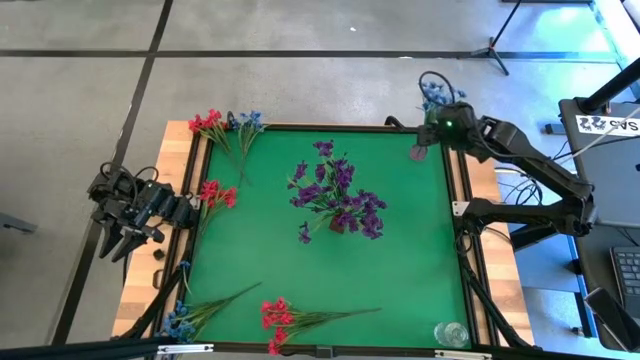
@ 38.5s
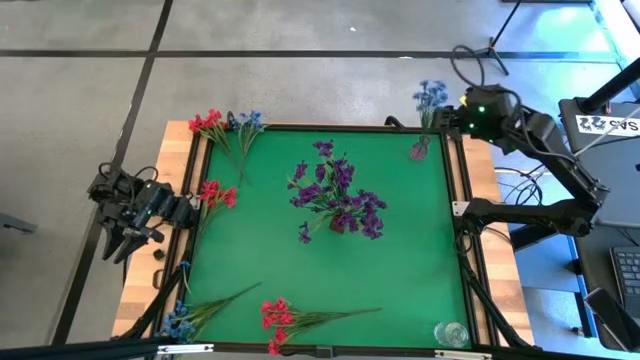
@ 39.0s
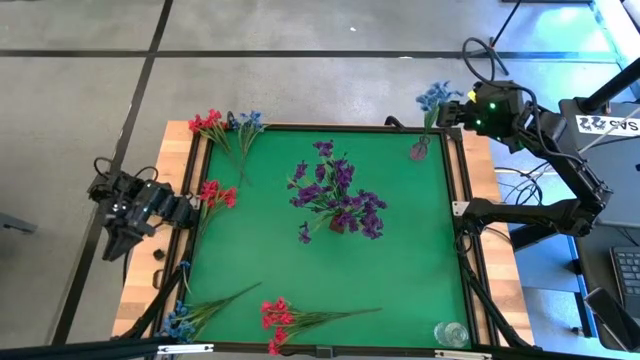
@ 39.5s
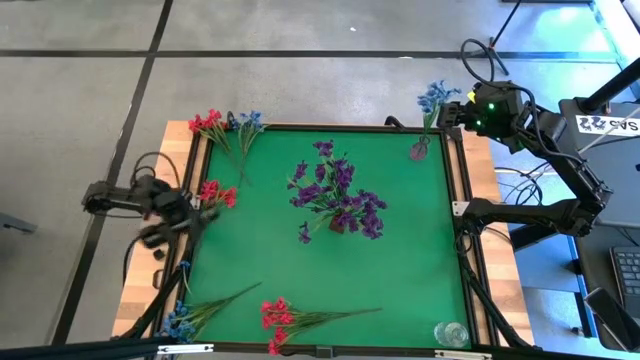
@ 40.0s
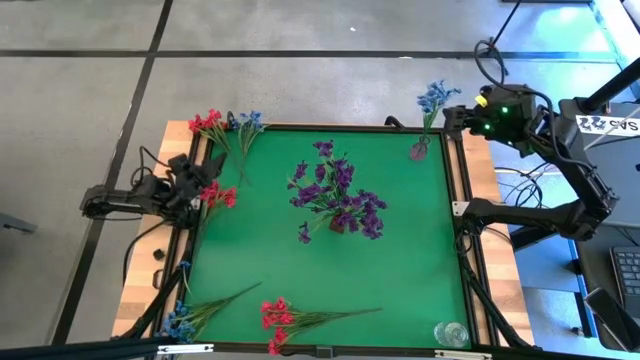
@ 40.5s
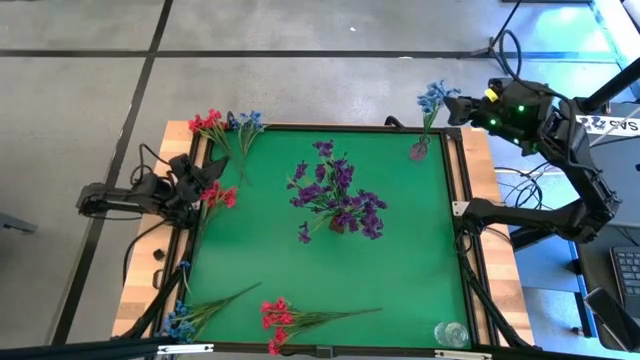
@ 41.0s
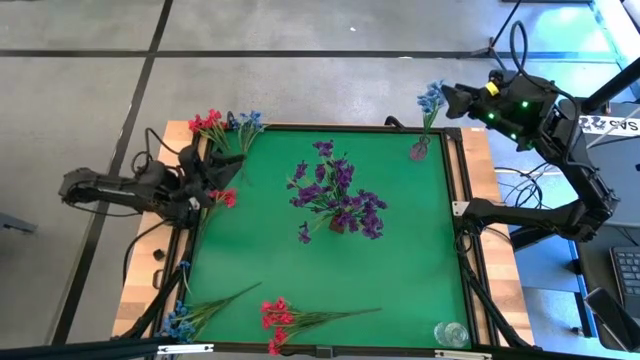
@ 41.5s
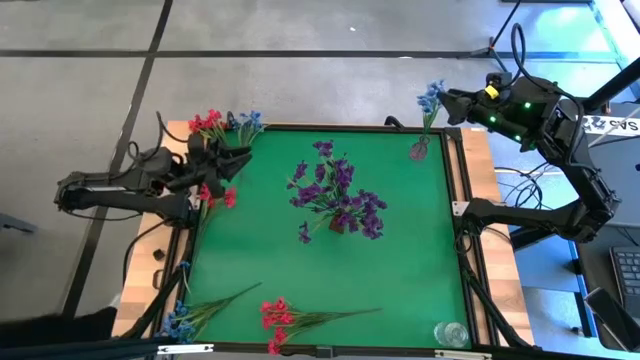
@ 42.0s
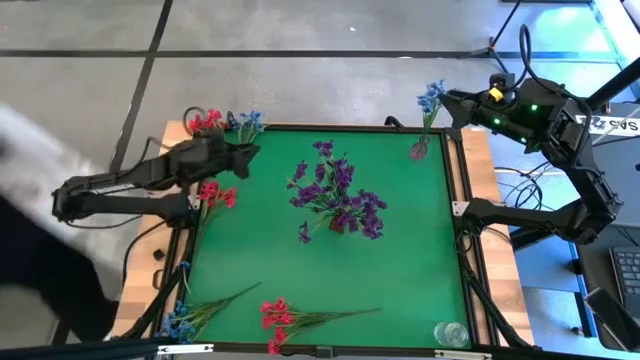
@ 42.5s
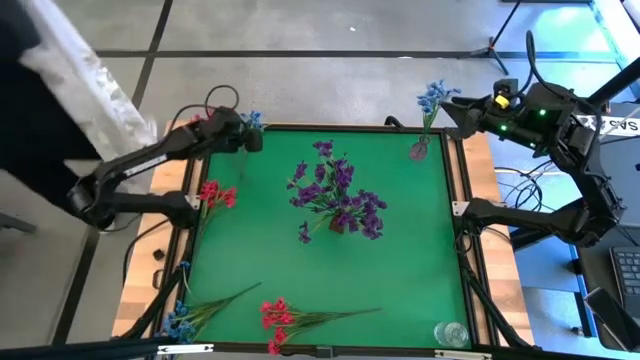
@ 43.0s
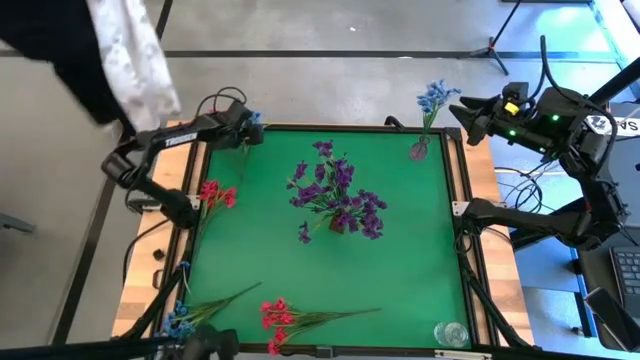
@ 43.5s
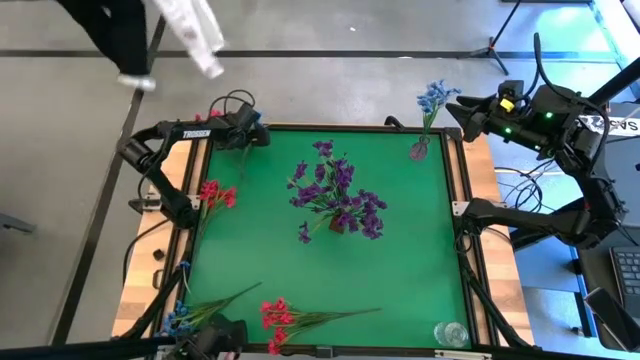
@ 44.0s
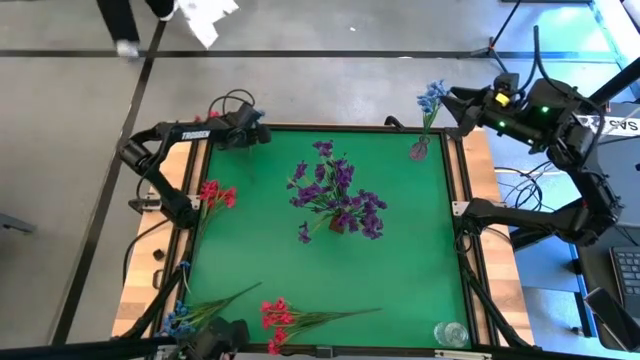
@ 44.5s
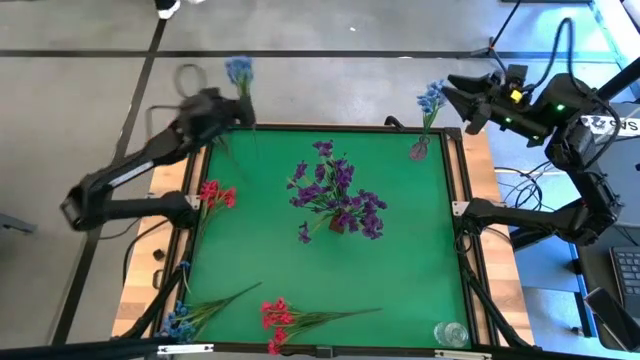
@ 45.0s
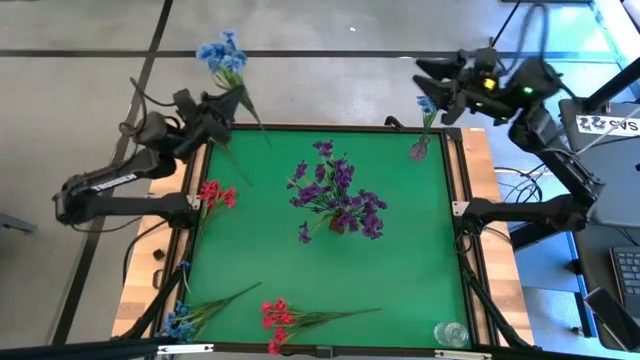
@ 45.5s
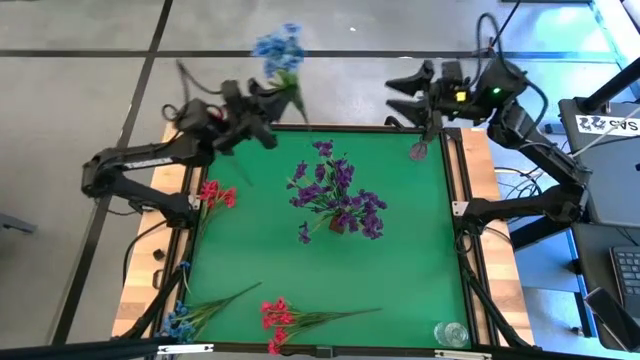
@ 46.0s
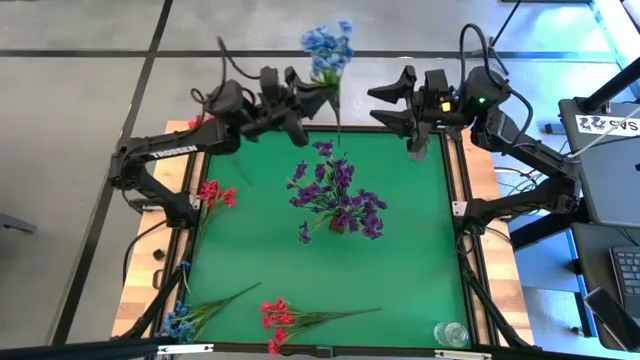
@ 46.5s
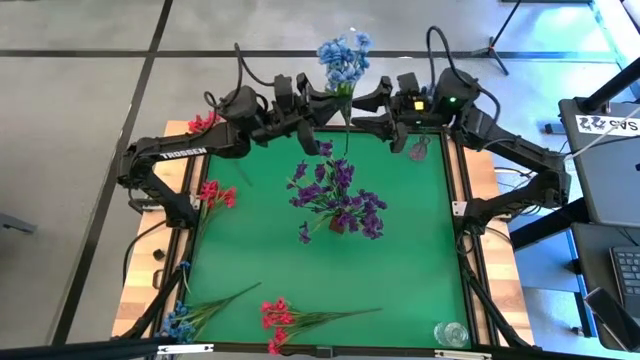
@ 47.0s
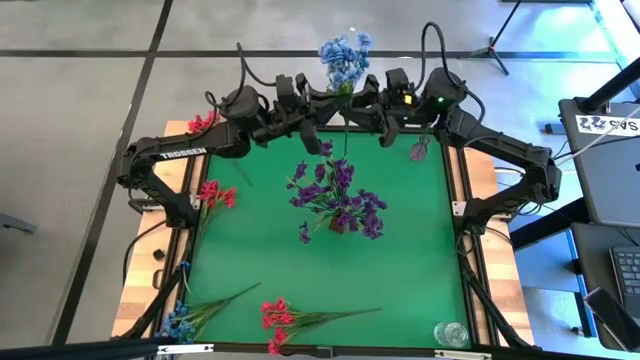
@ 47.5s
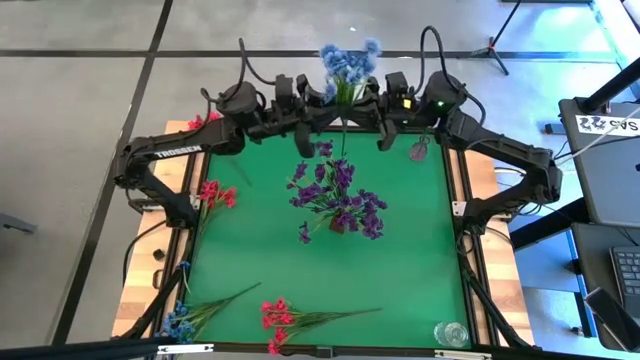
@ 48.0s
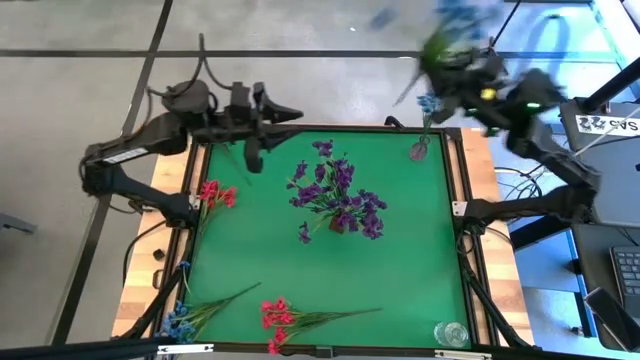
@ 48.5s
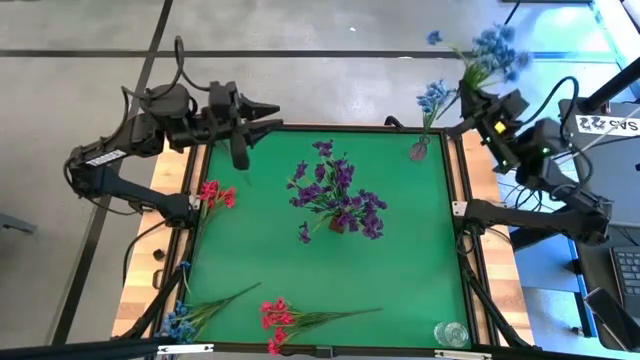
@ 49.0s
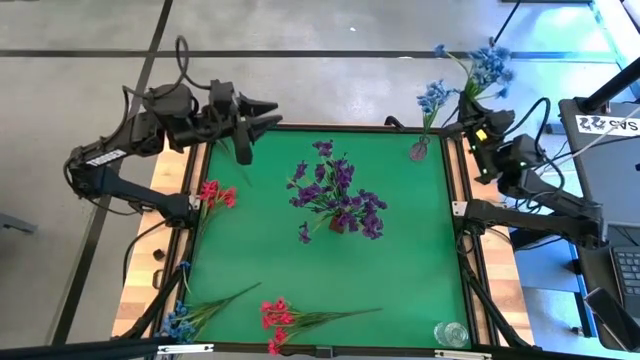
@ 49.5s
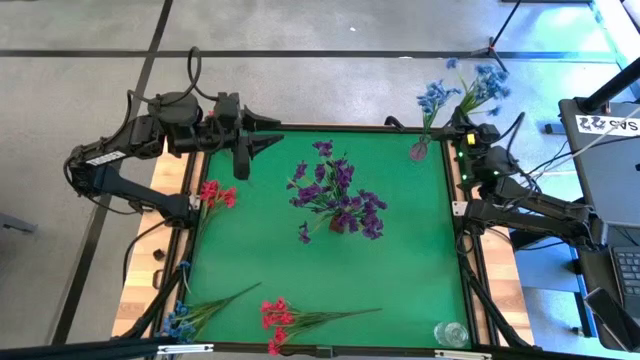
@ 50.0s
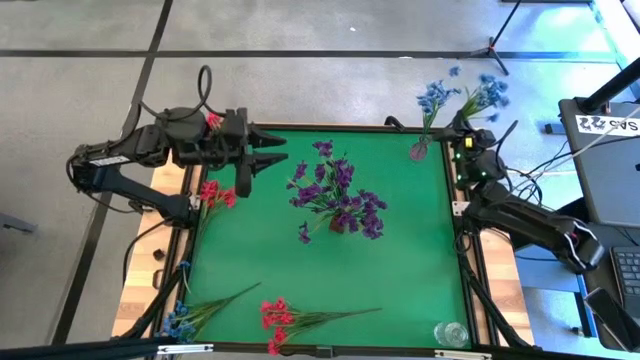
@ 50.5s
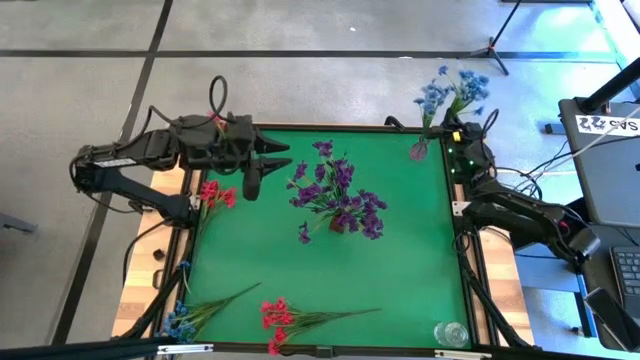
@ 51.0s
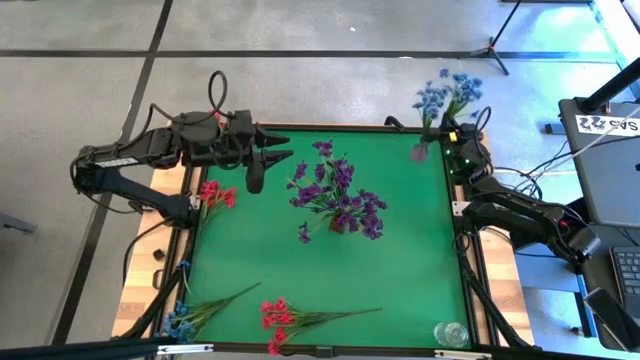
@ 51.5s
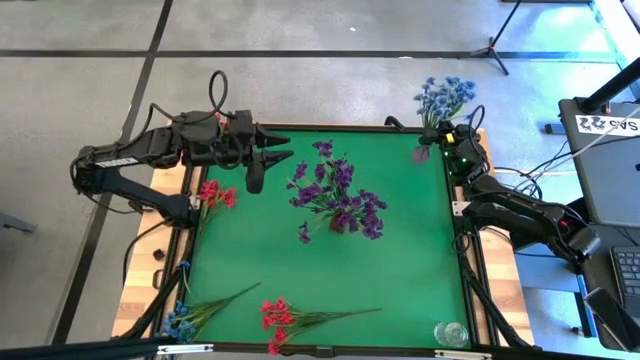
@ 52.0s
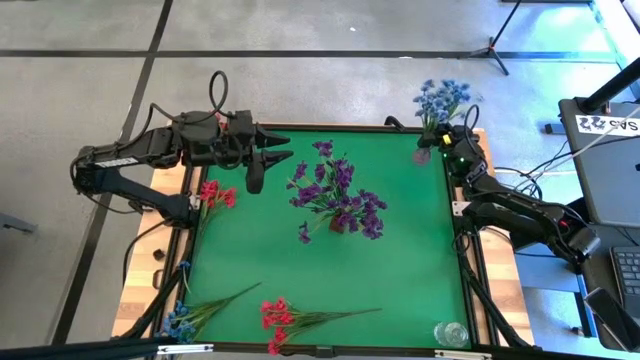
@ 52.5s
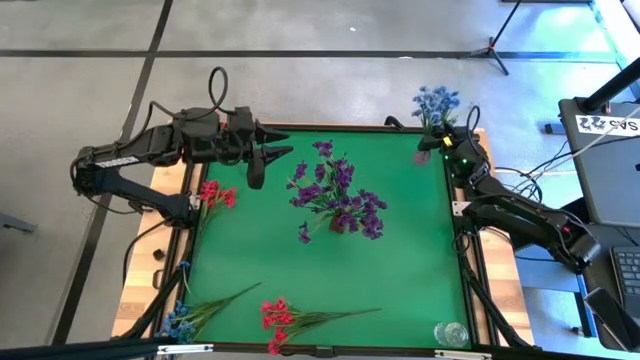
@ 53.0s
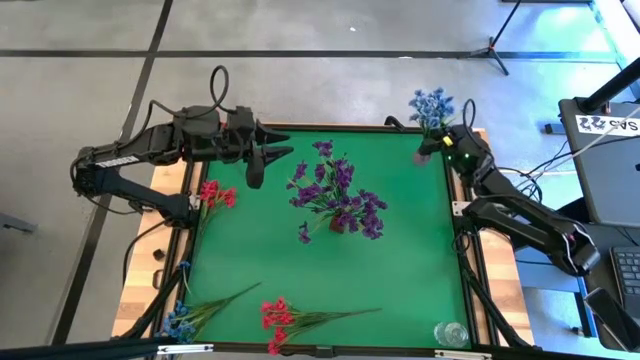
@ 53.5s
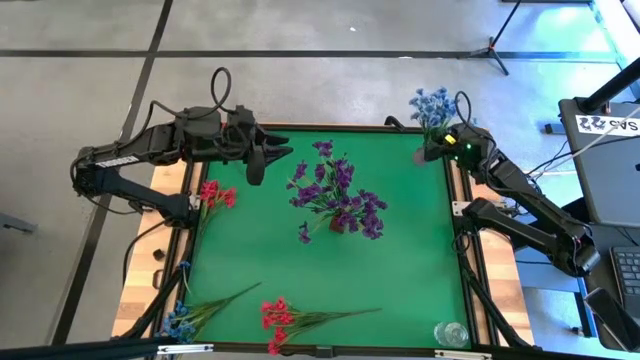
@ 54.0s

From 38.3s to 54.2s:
Task: Sort flowers into vase by color
Put the top blue flowers into the violet vase

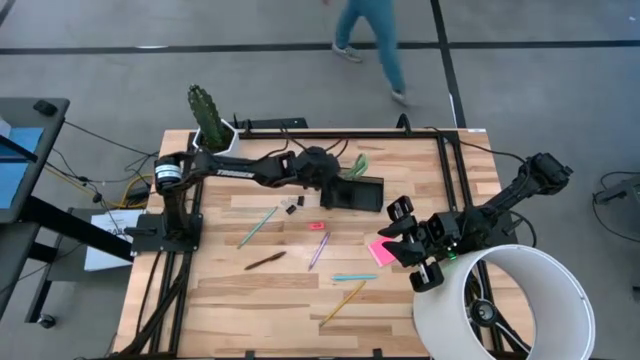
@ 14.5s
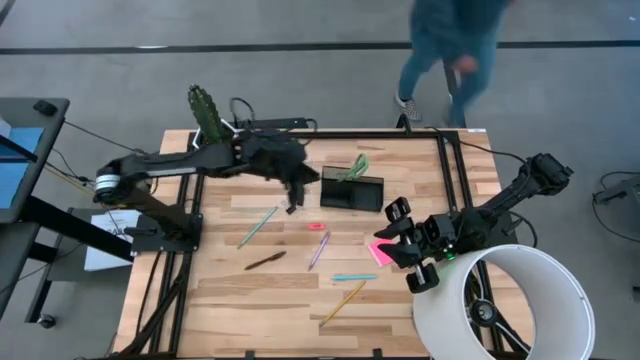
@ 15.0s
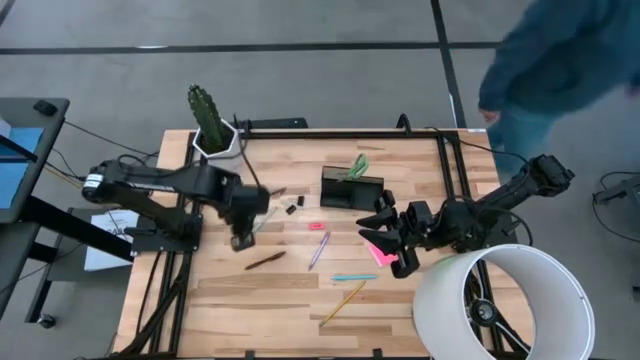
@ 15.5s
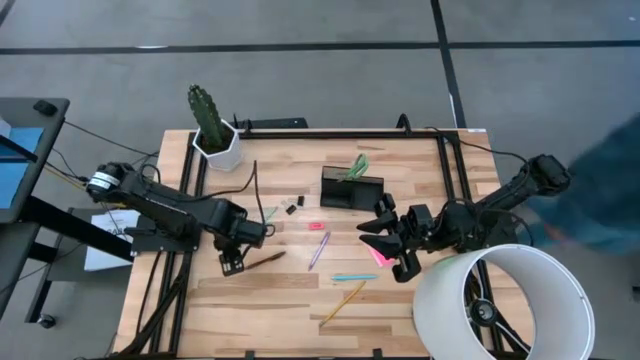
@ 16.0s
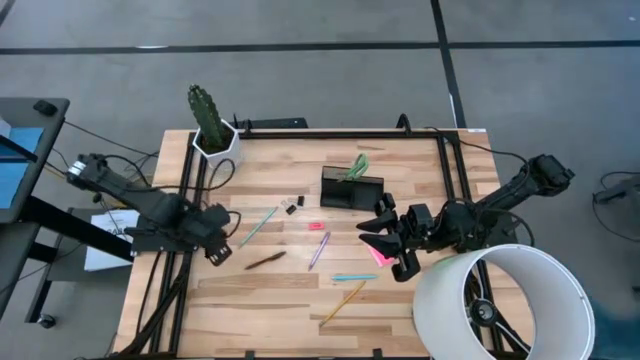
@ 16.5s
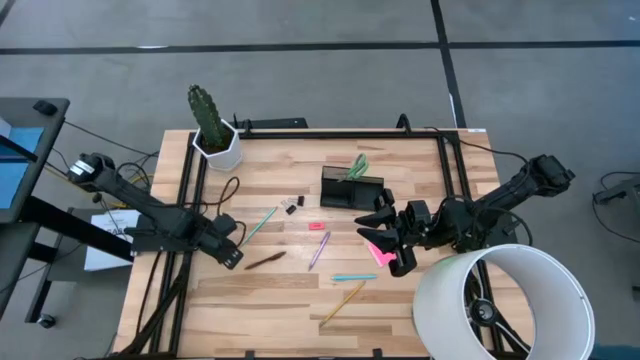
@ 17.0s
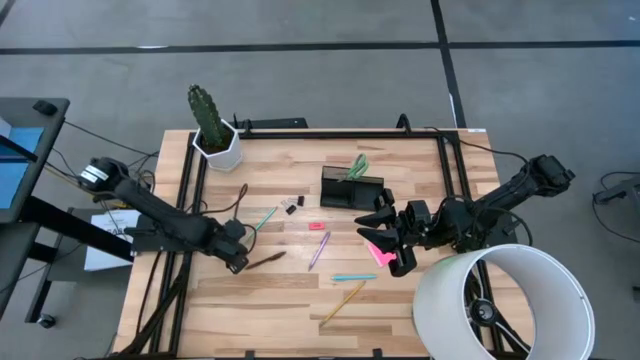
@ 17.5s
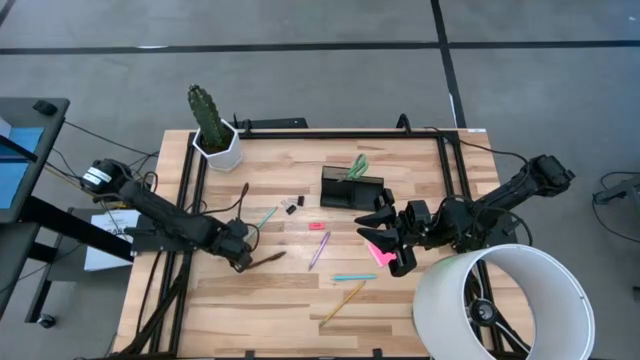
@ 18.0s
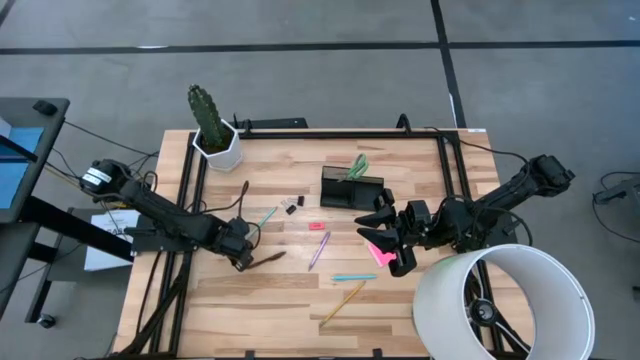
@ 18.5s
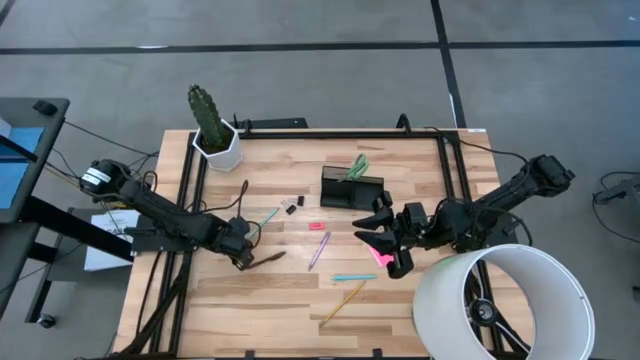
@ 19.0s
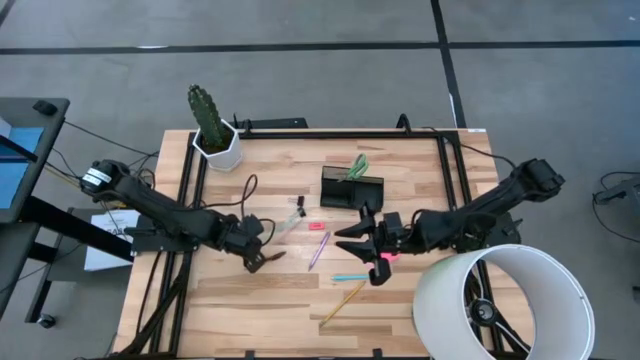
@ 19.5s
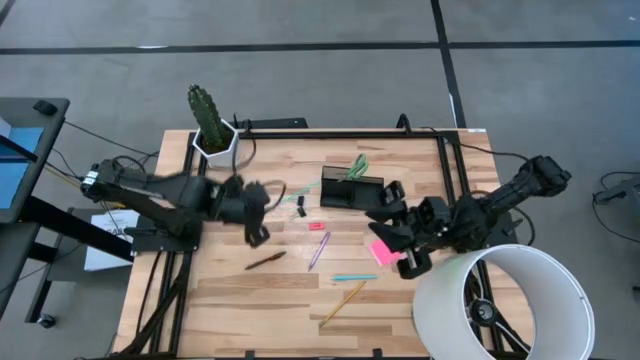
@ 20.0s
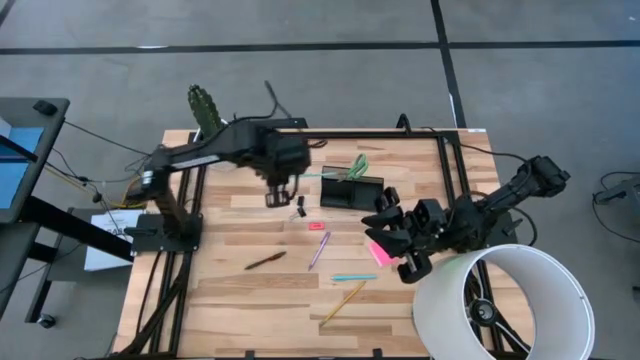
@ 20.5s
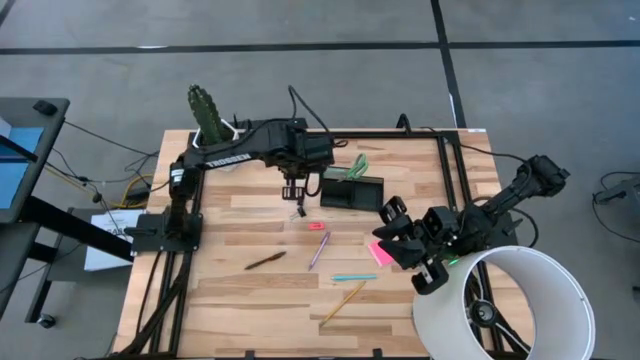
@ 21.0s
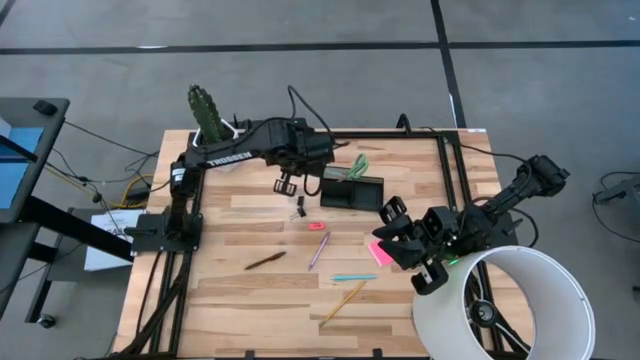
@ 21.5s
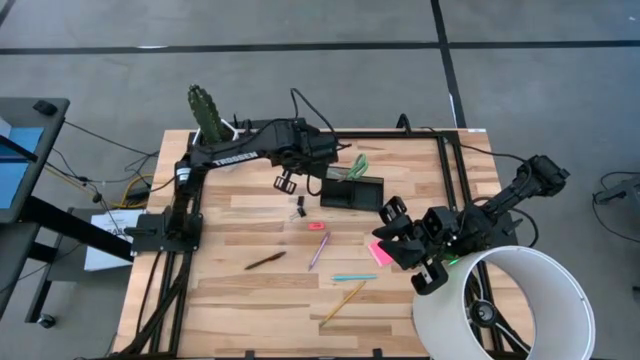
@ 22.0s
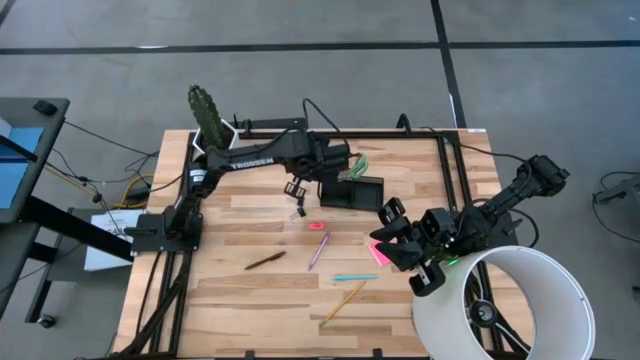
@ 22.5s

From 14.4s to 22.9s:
Task: Pick and place office supplies into organizer
Put the blue pencil into the black desk organizer
